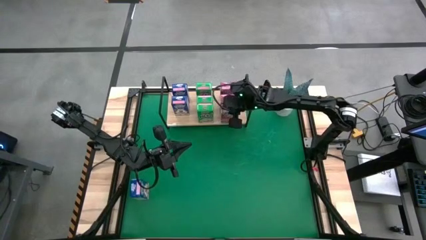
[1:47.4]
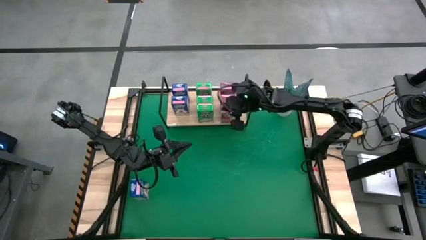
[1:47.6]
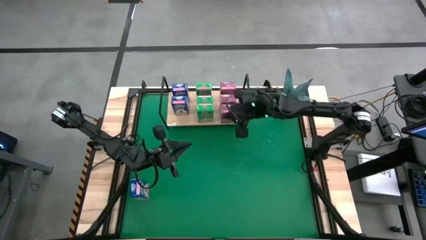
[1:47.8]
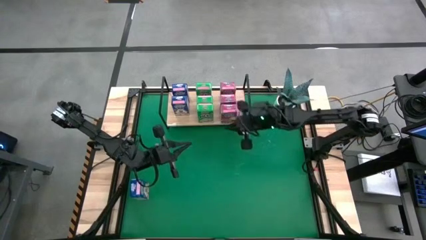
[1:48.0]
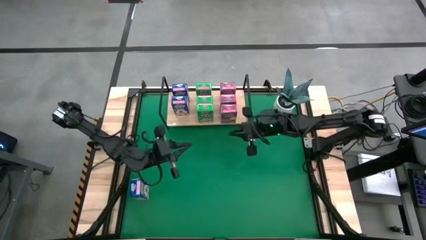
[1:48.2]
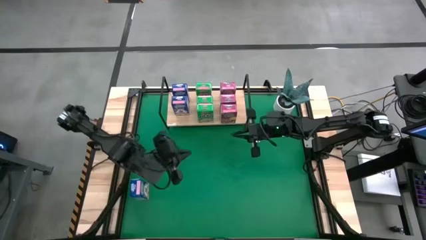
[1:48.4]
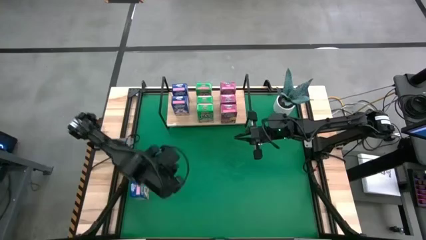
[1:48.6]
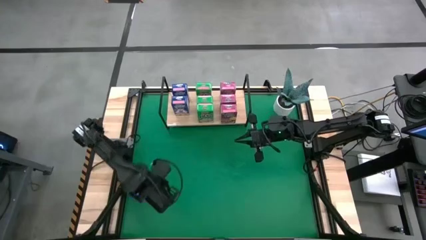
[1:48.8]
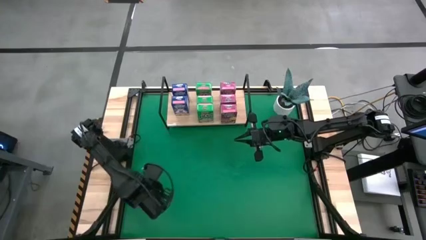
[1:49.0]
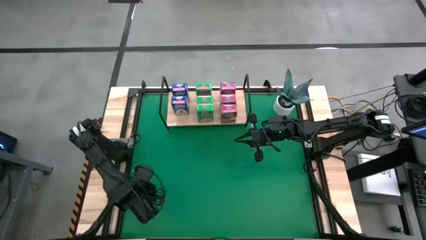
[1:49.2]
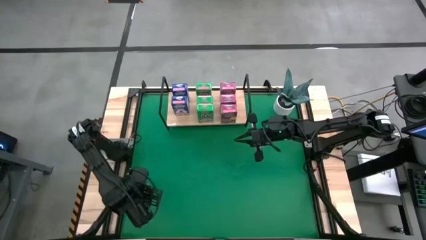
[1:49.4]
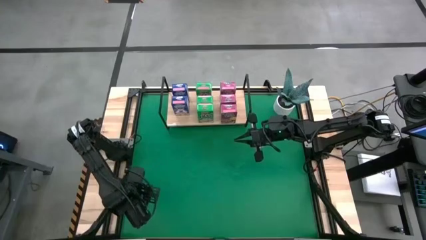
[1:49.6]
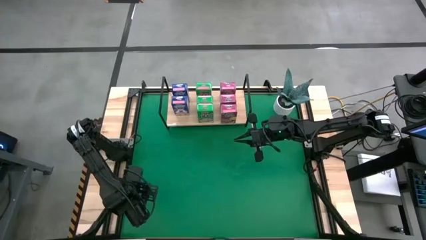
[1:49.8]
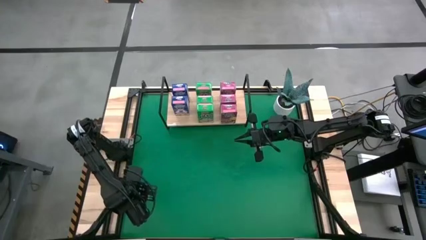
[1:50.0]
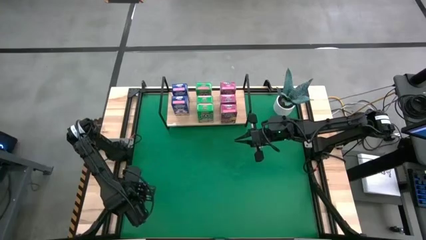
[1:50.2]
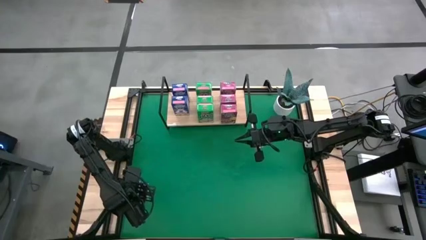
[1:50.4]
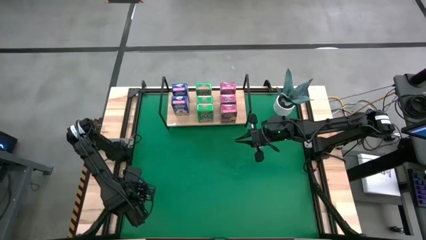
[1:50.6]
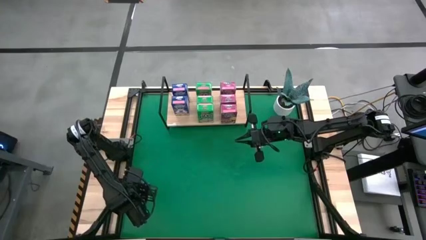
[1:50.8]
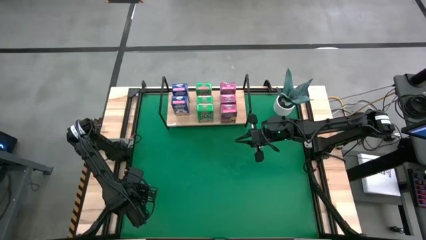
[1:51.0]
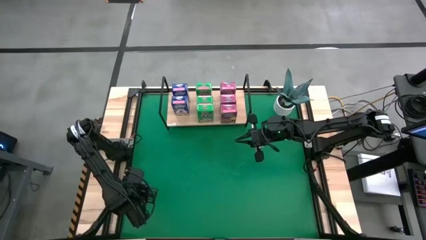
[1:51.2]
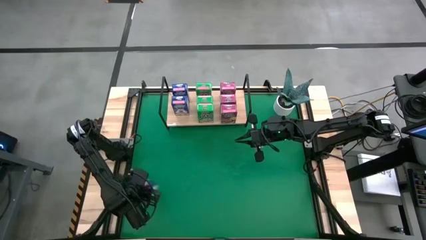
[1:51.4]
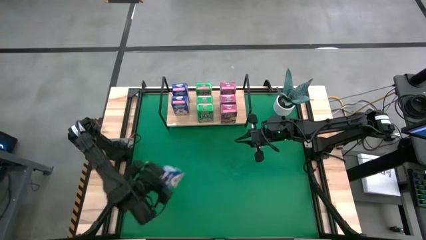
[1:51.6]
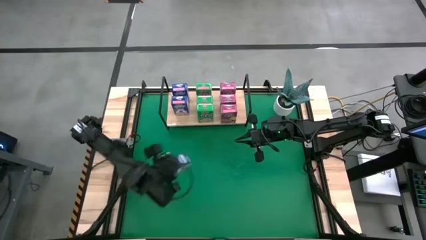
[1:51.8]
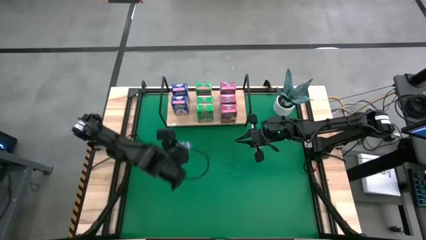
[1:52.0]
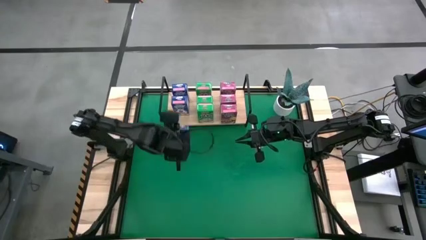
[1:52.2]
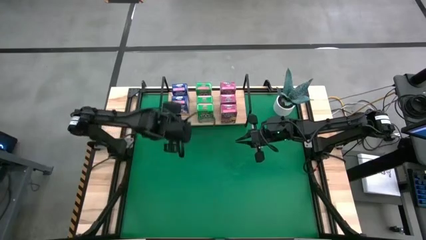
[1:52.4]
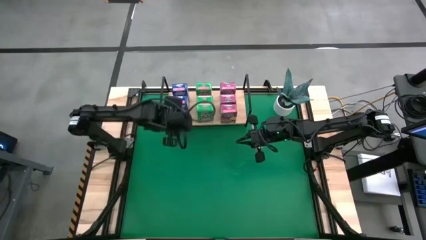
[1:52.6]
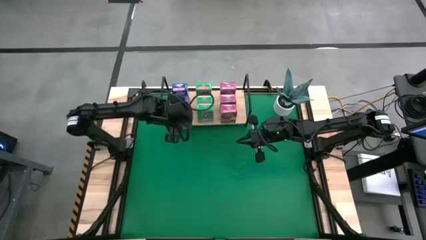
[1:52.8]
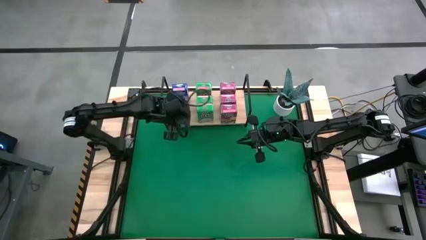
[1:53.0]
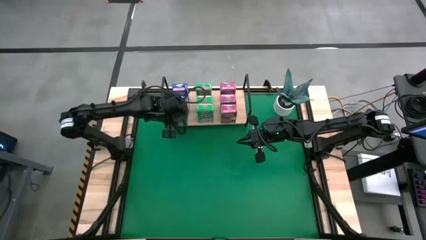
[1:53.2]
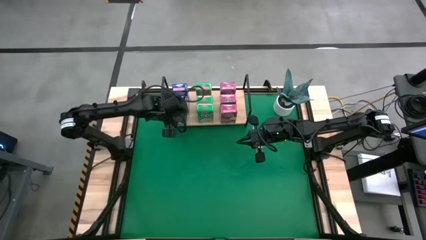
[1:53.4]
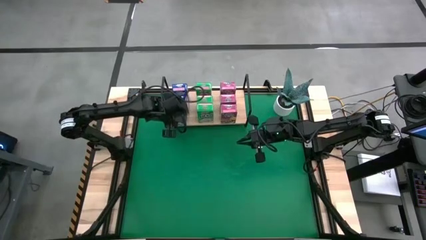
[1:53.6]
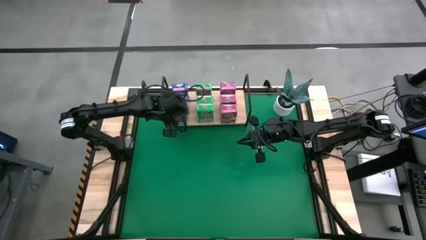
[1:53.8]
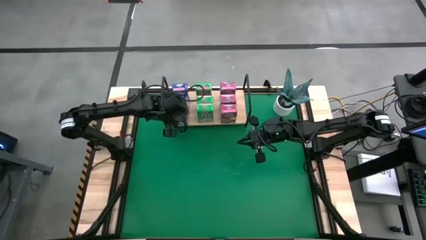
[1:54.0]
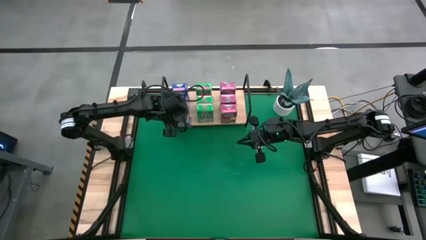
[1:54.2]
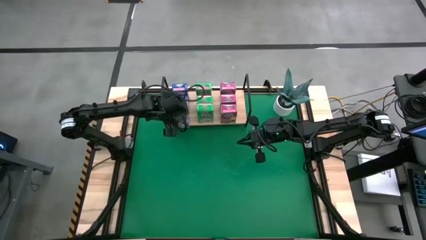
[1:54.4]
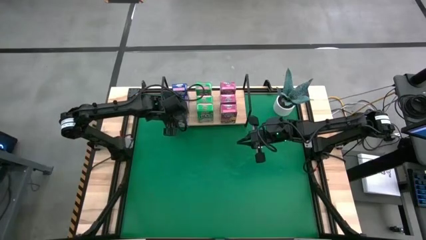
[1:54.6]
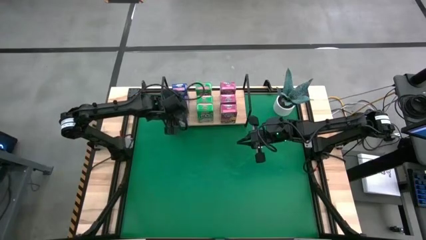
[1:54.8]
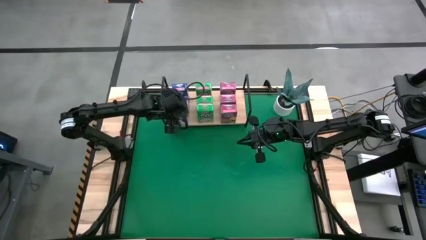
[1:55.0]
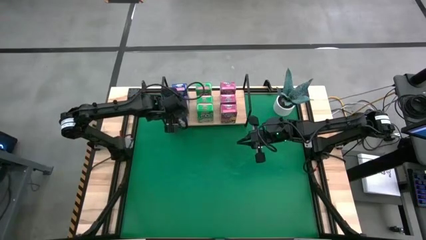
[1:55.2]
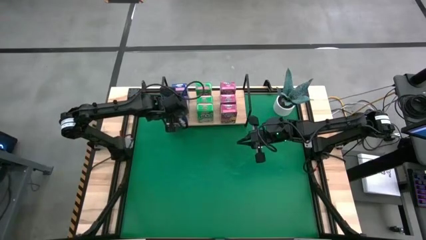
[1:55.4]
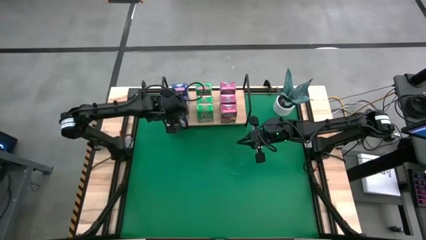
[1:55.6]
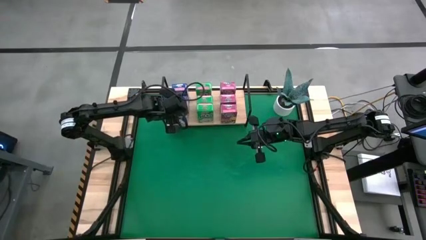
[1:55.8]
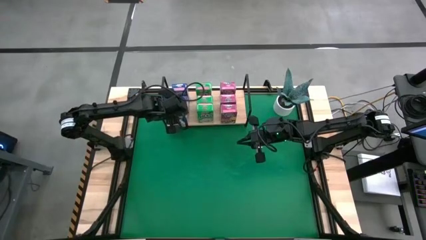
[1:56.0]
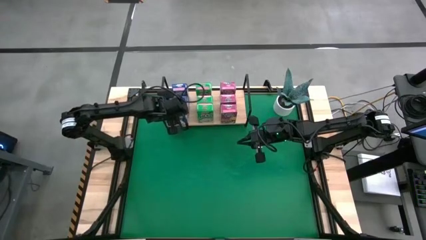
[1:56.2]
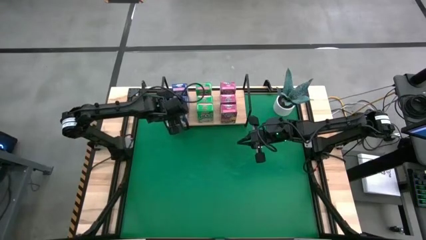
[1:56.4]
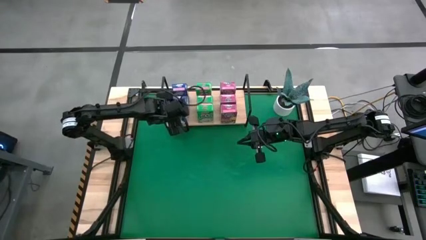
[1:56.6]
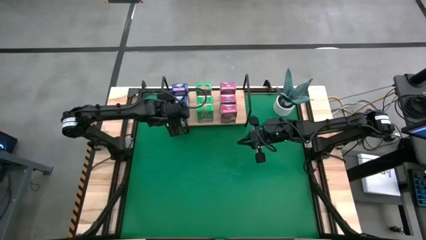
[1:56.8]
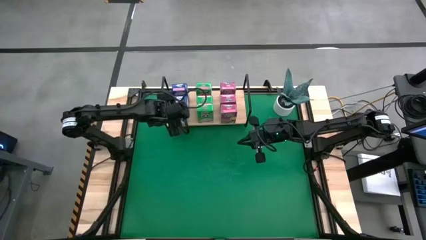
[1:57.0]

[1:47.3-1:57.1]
Task: Stack cereal on shelf
Put the blue cereal box aligned with the other blue cereal boxes on the shelf

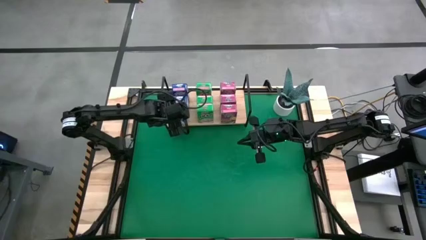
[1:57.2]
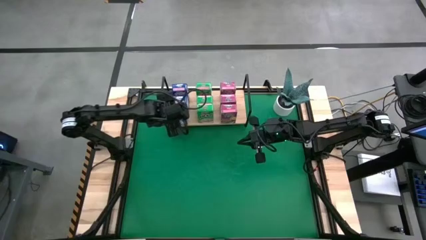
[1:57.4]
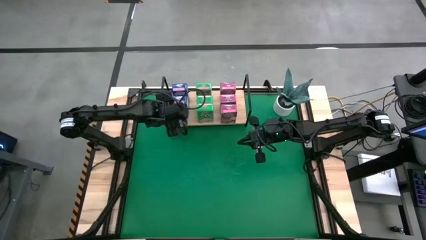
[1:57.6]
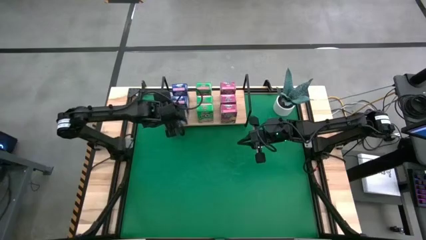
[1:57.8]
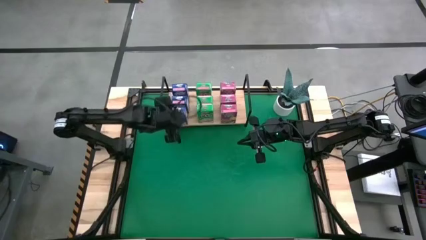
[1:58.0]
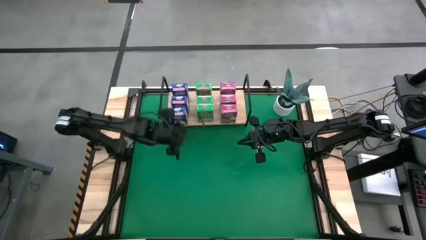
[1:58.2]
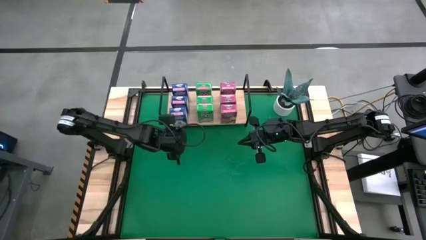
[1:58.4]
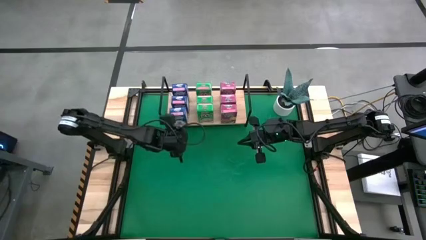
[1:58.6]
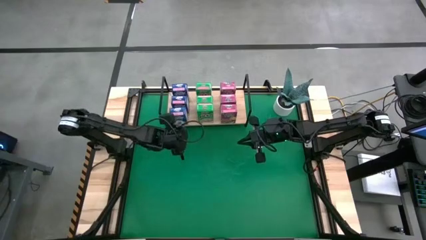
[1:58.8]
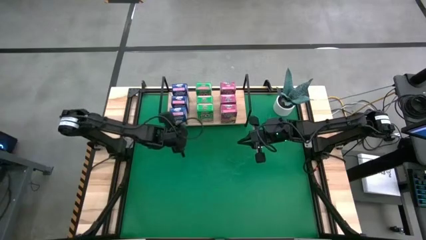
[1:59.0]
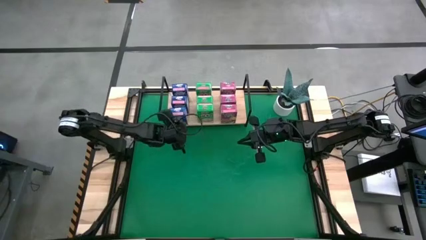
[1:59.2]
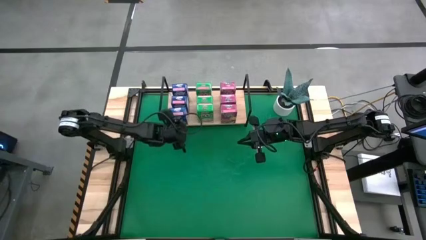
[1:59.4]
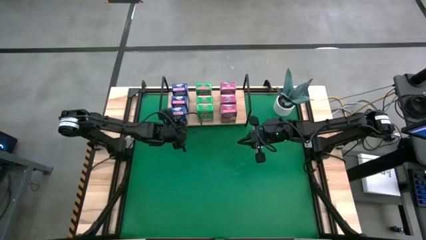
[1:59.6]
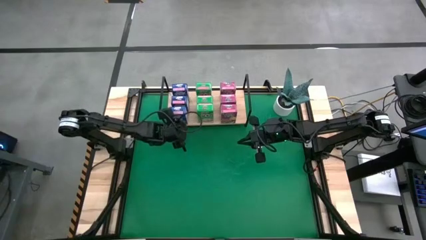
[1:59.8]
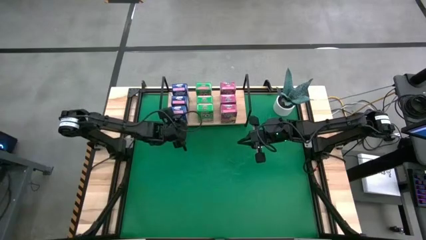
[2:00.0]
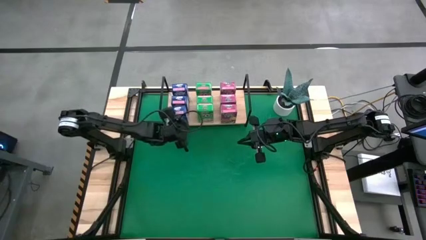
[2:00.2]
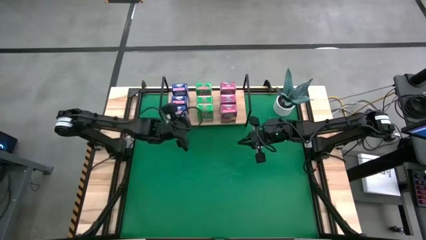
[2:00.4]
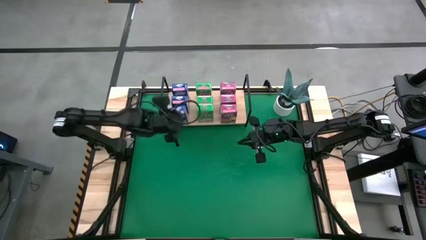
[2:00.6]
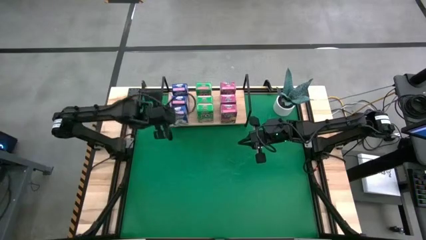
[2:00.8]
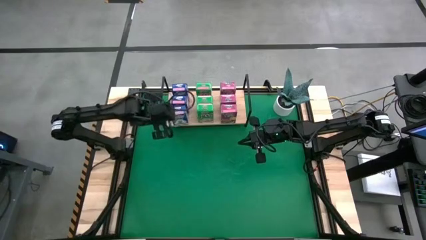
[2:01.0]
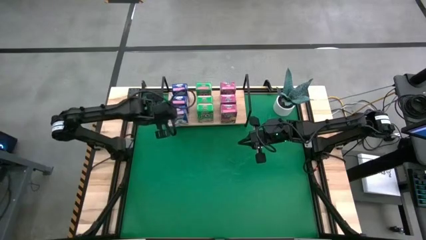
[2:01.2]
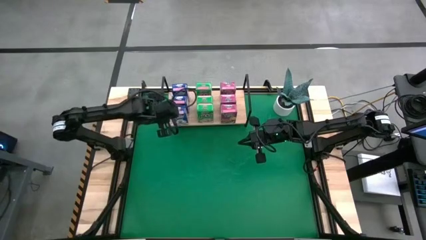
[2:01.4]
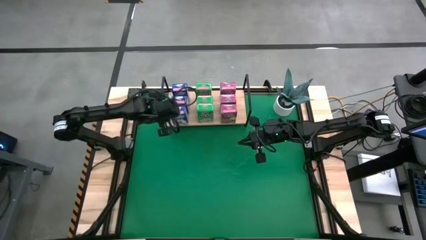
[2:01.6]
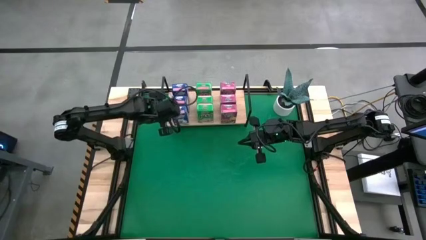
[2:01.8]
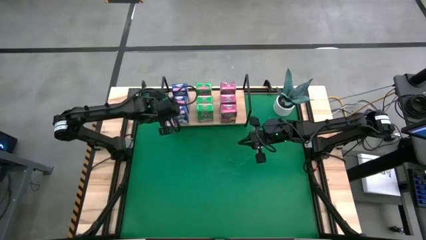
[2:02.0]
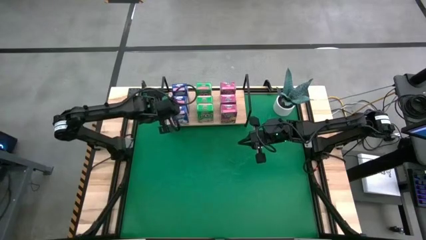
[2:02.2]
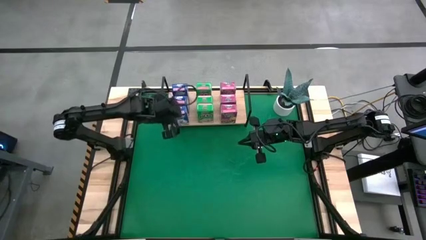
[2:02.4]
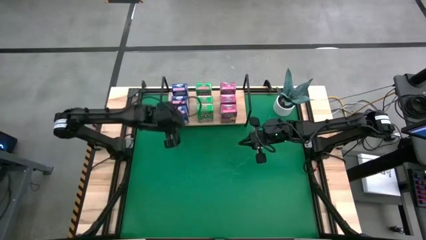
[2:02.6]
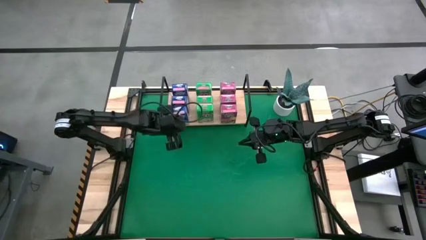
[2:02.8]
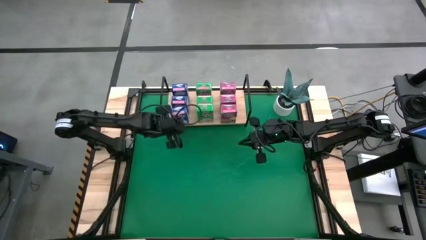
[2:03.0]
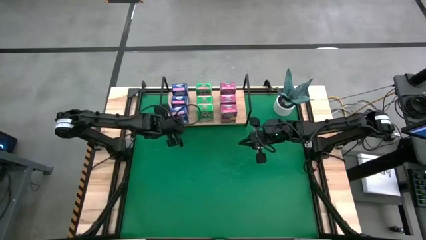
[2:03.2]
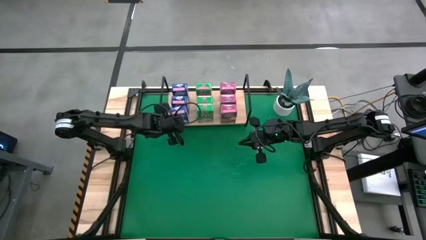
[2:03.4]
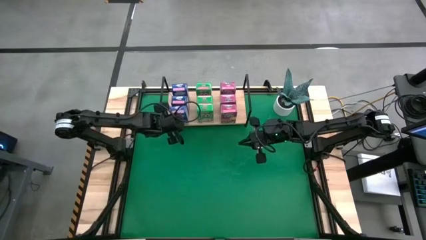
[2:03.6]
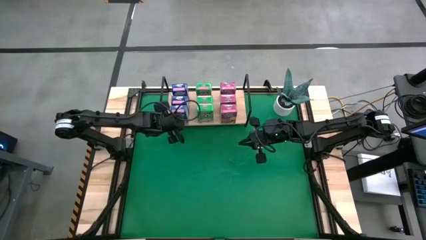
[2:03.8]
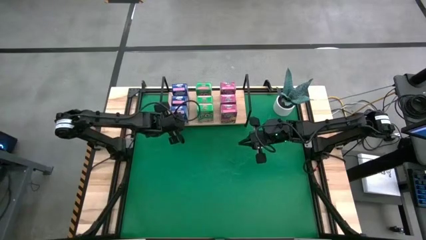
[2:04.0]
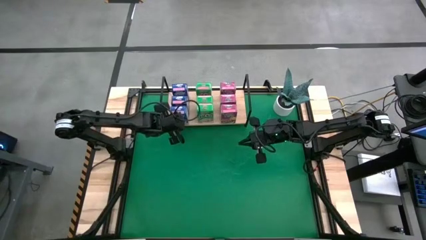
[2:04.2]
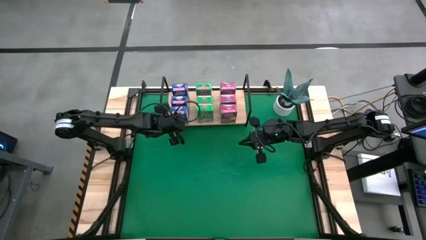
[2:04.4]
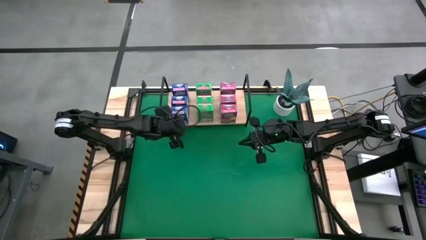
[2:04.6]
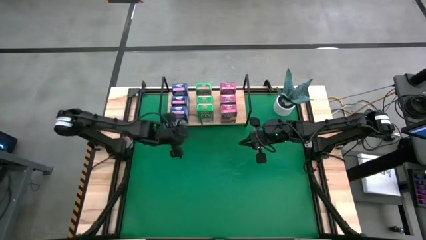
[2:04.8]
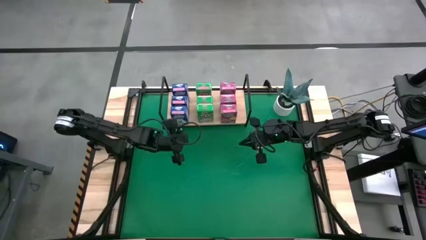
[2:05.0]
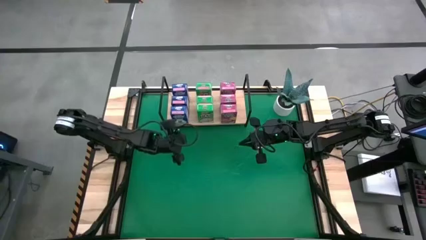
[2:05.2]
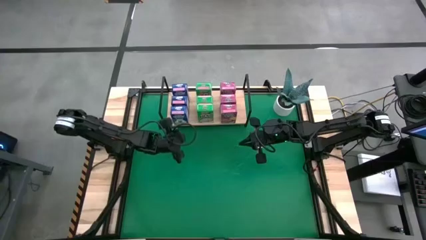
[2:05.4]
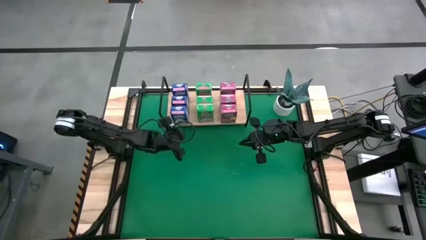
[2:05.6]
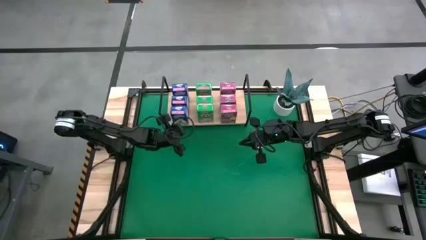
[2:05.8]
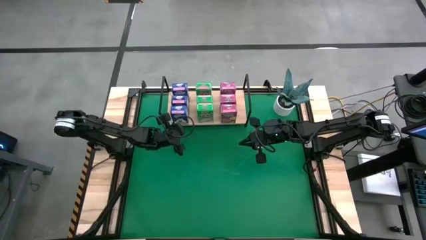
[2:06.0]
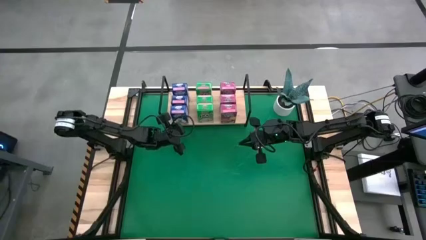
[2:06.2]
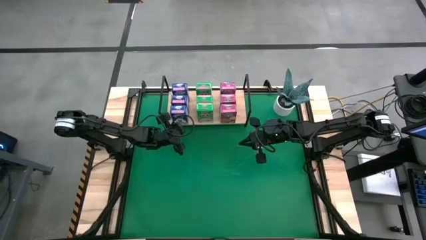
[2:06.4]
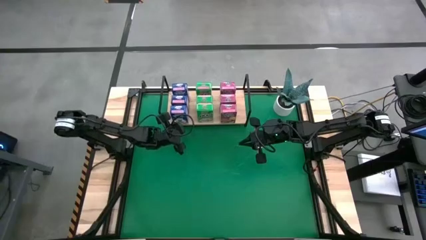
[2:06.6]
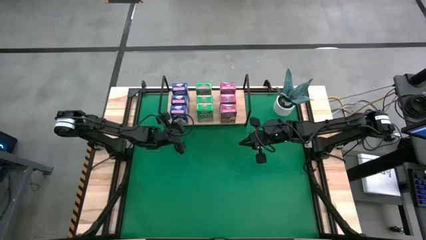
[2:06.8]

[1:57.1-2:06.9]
Put the blue cereal box aligned with the other blue cereal boxes on the shelf
